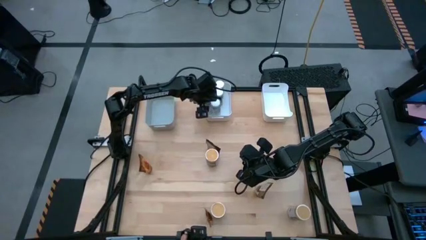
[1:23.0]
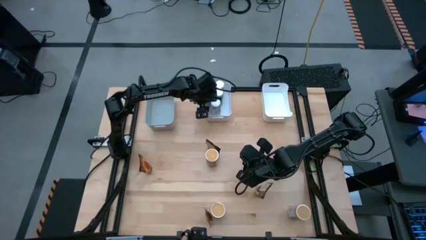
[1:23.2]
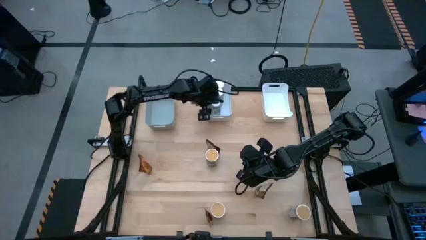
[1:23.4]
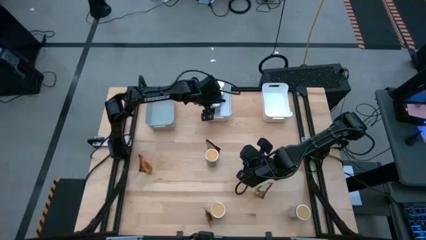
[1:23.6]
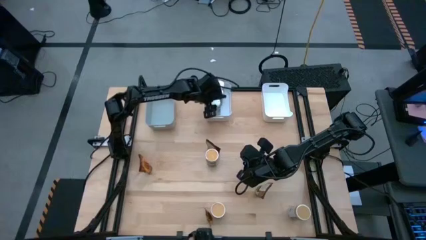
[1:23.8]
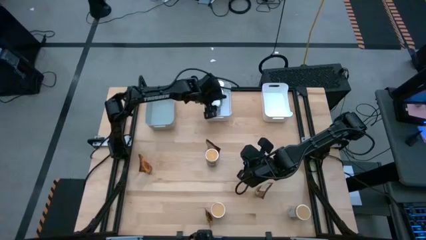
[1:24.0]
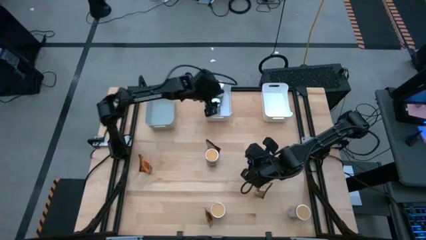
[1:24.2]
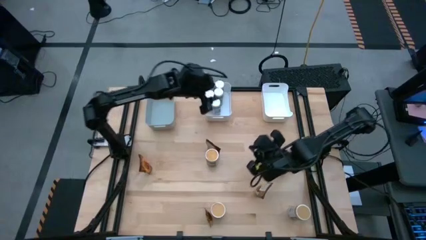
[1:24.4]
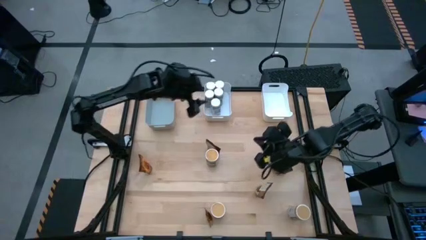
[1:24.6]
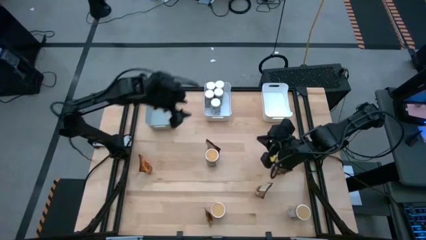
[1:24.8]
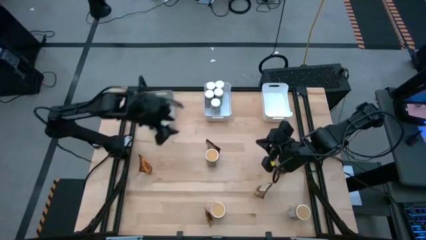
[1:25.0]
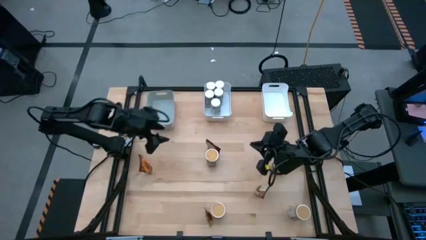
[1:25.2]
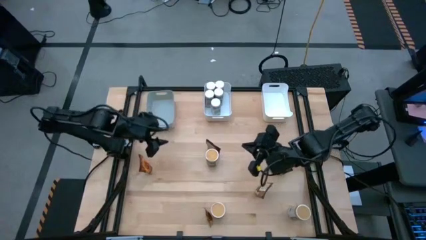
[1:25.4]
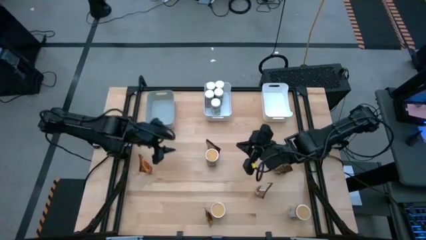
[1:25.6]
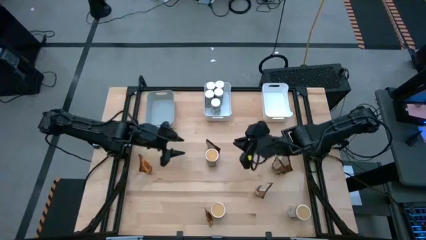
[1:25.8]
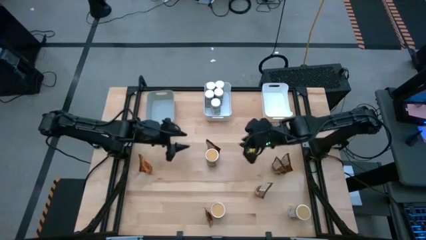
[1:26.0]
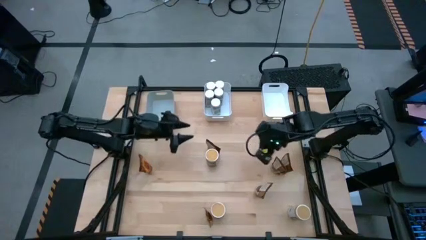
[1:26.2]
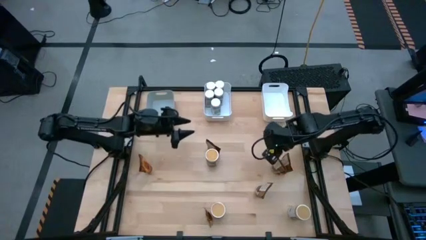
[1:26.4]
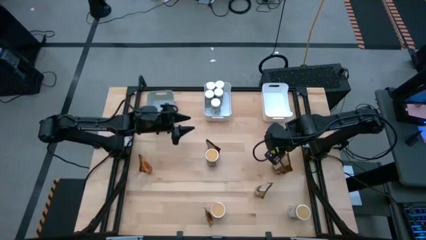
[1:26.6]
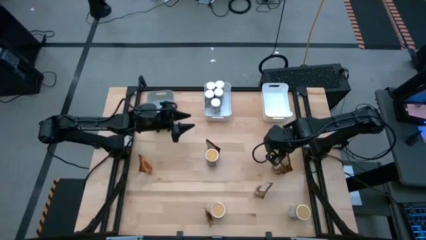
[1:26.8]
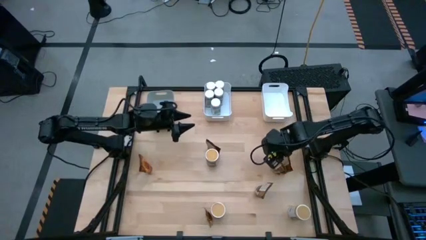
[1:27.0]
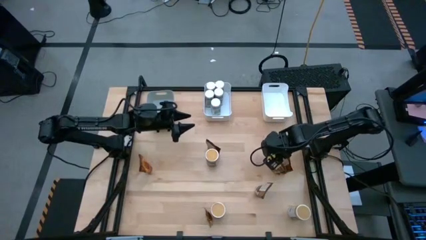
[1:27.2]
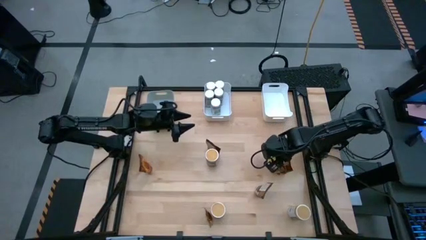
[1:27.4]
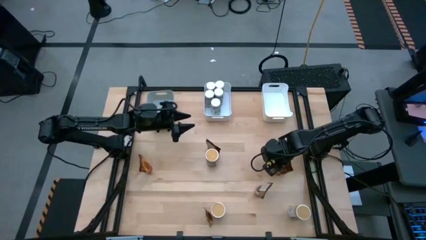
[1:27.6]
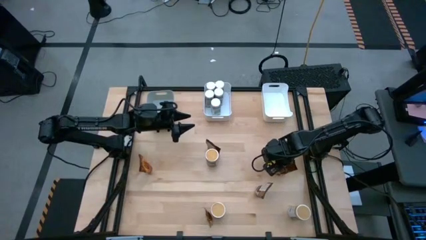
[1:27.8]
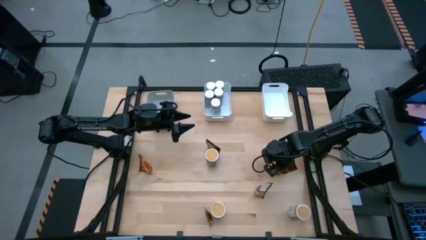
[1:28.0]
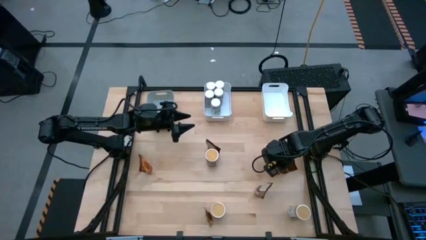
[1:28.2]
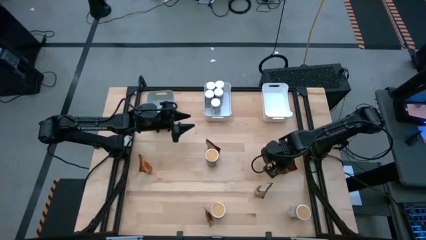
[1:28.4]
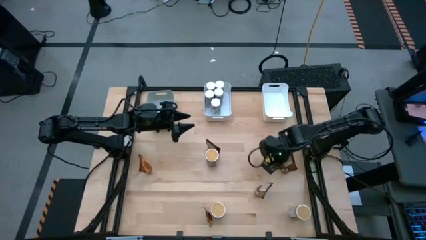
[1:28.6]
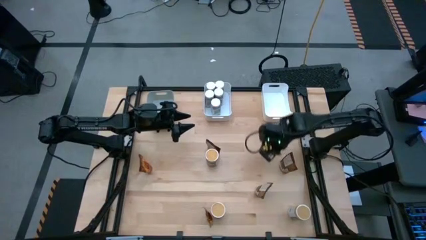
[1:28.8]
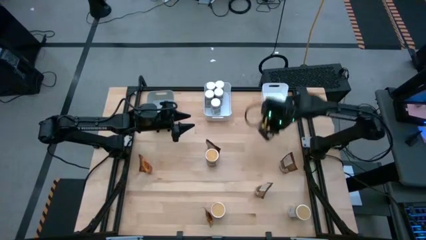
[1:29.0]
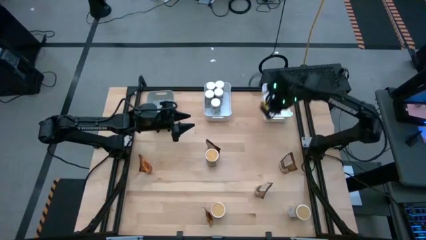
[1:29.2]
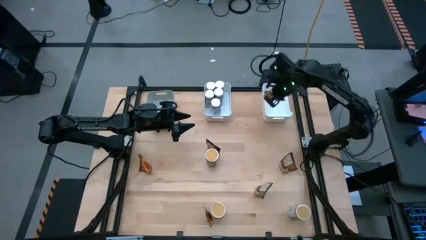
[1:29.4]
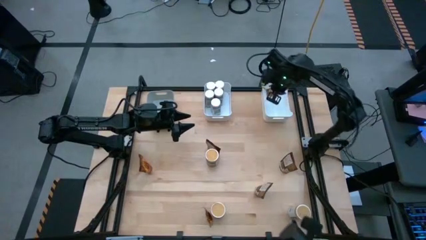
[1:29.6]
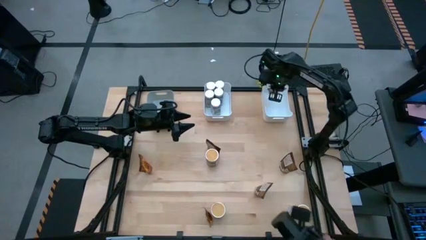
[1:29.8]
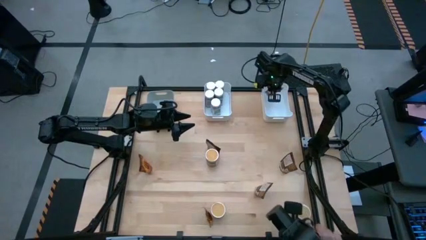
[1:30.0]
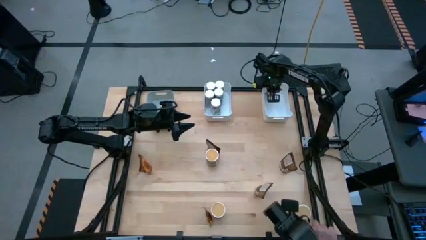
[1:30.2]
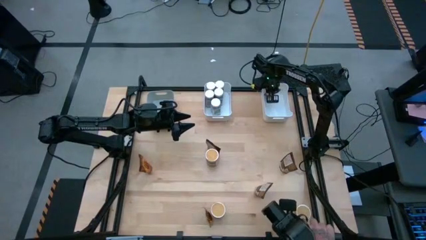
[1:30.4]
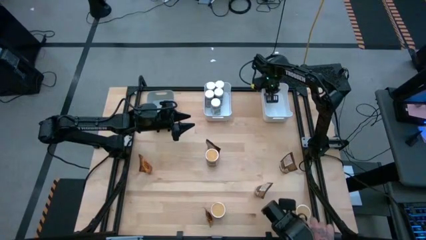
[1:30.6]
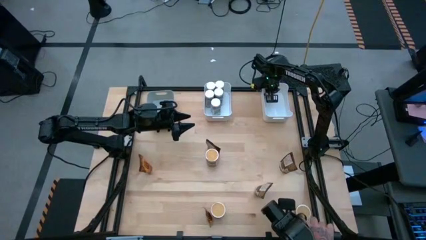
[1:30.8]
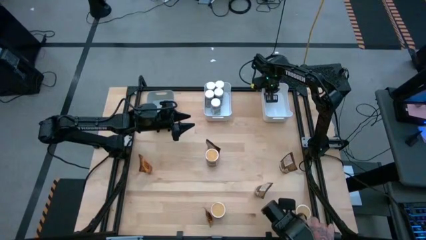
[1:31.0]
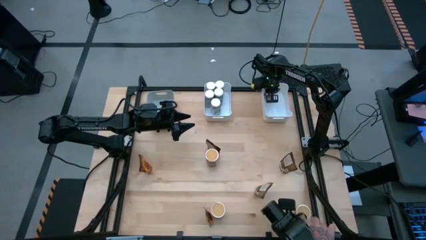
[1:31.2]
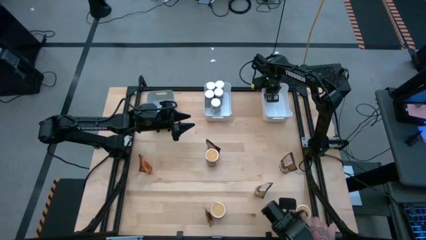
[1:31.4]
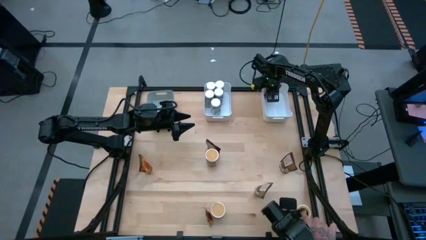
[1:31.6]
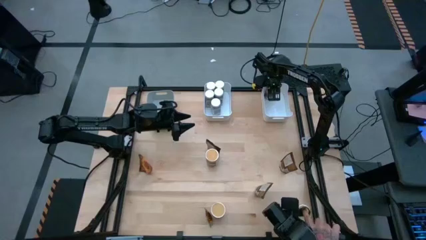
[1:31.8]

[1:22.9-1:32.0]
Task: Sort spices by type
Put the orange seasoning bag into the right white bin

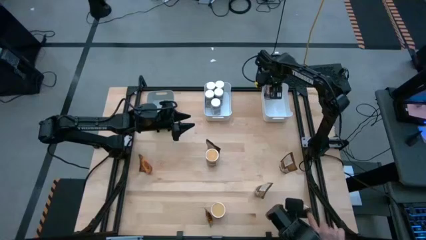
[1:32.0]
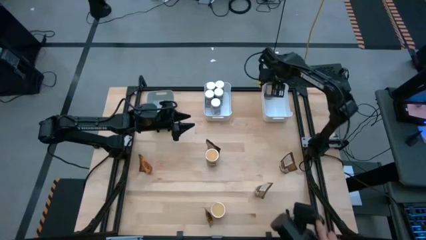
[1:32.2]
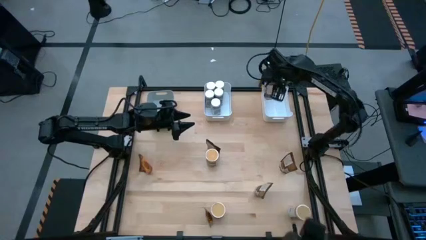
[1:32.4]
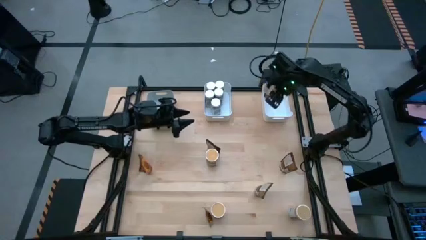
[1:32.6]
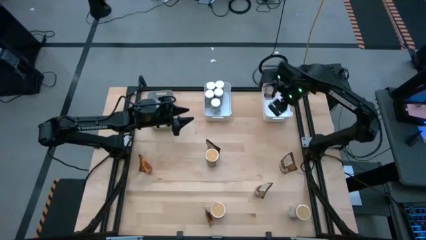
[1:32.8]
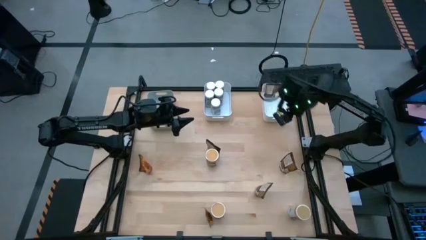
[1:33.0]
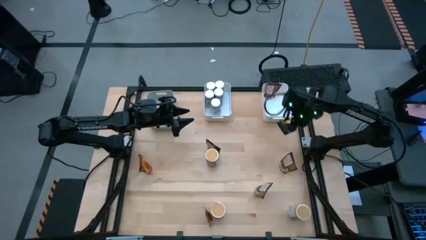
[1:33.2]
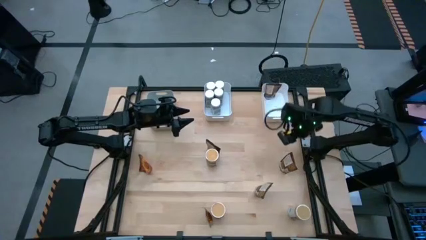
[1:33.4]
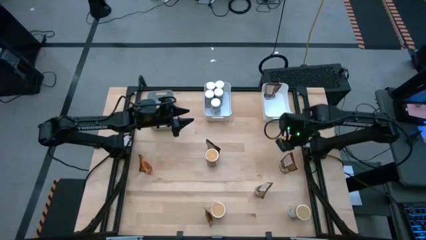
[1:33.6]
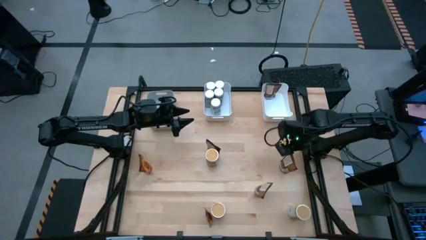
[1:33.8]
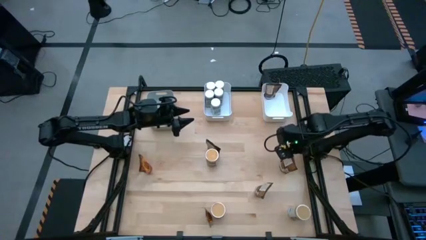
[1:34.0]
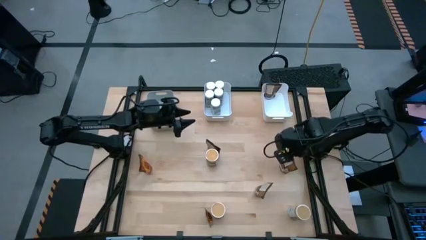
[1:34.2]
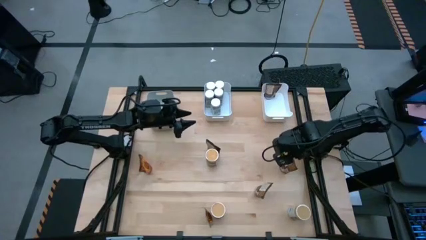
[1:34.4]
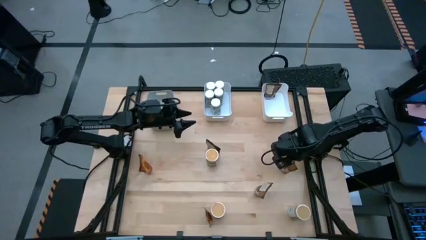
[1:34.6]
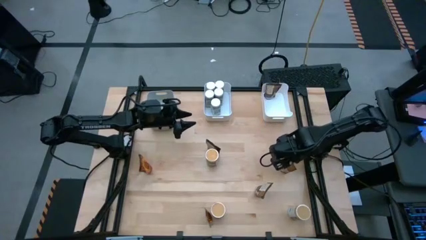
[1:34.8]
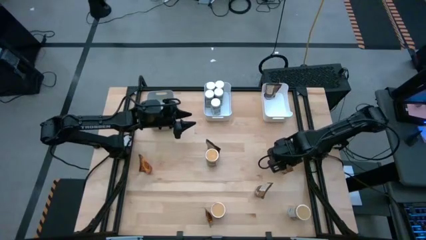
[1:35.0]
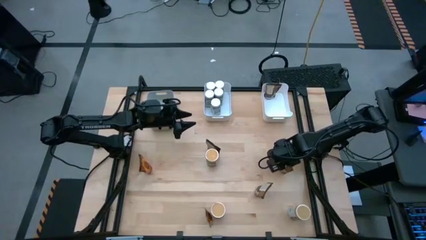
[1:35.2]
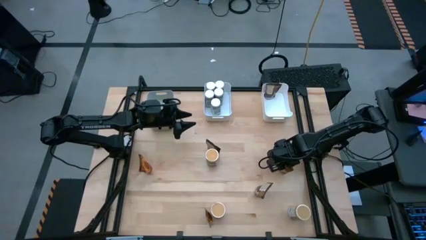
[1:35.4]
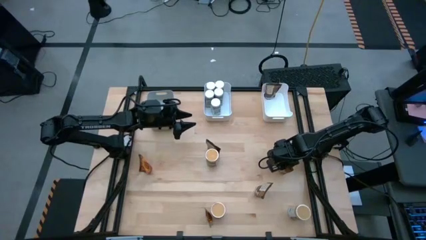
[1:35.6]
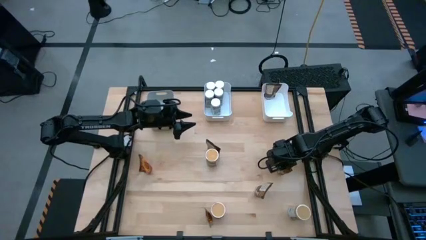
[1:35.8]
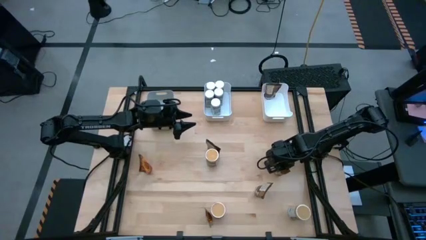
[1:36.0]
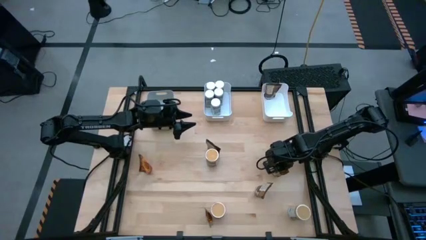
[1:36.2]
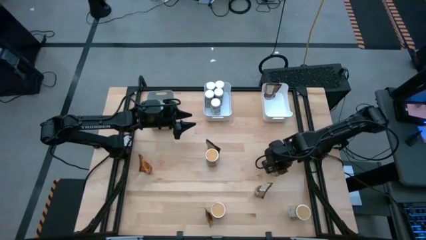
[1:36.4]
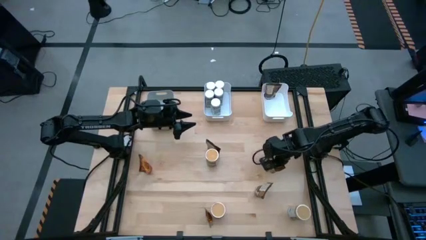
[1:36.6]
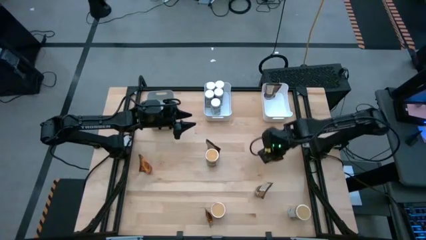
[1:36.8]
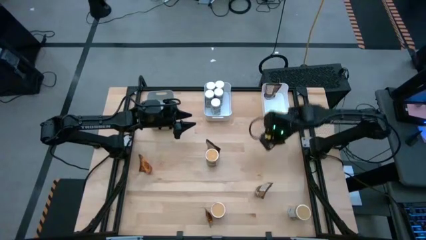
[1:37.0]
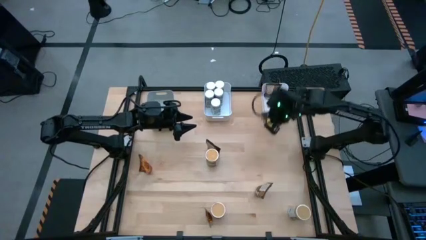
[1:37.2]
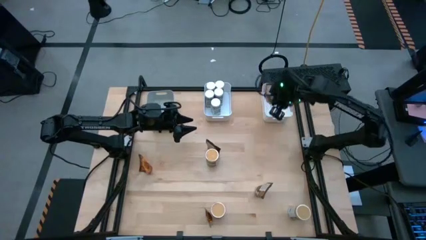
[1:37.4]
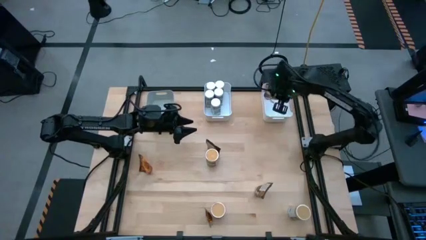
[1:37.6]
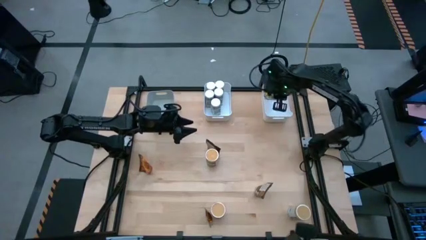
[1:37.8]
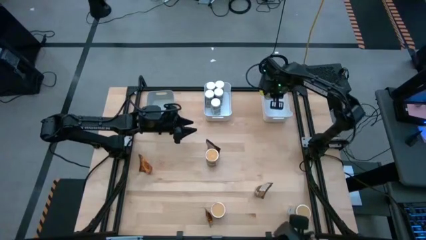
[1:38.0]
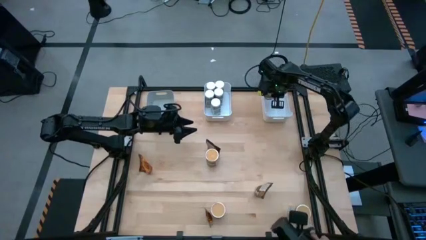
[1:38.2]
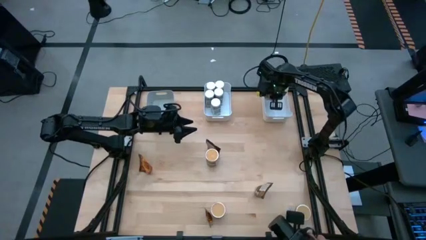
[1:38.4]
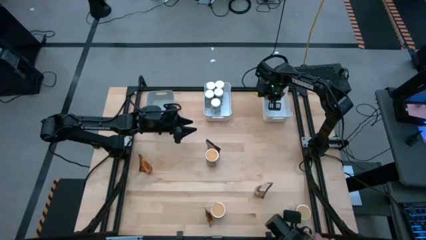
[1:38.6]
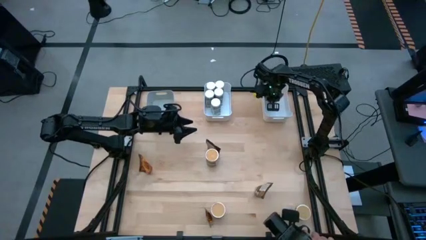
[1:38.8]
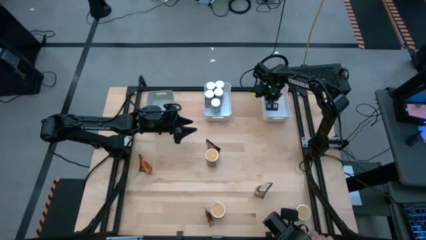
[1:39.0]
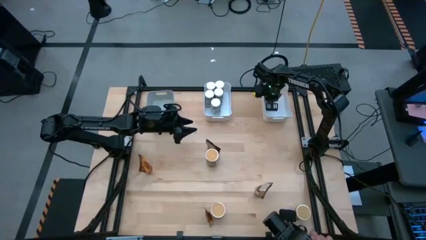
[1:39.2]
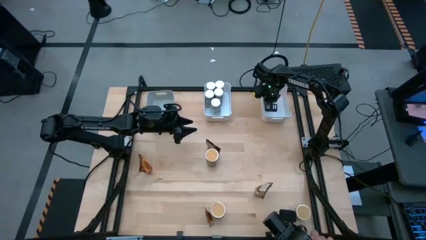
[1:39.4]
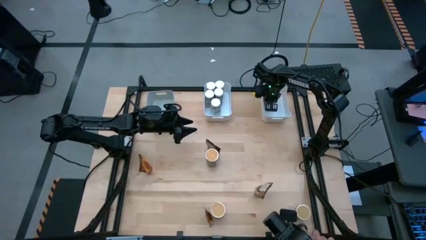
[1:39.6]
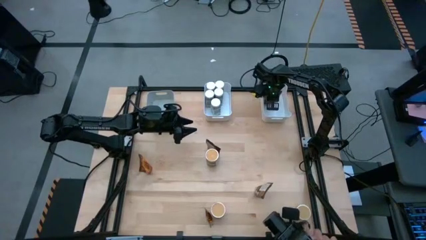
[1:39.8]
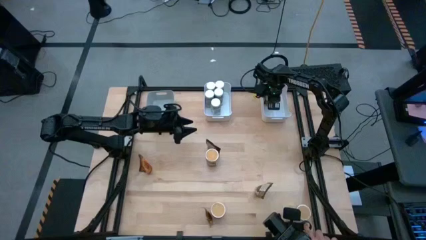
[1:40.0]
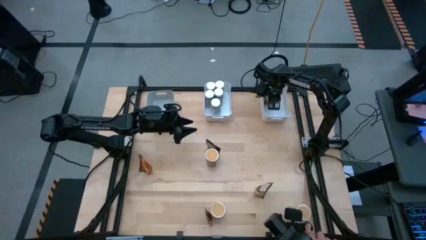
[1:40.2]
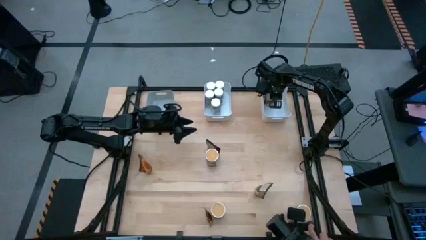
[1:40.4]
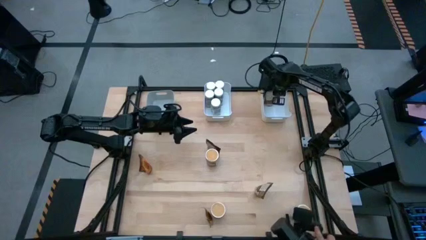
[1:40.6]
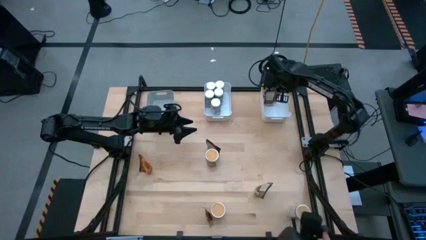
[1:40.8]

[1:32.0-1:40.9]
Put the orange seasoning bag into the right white bin
